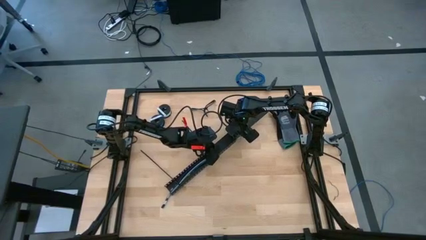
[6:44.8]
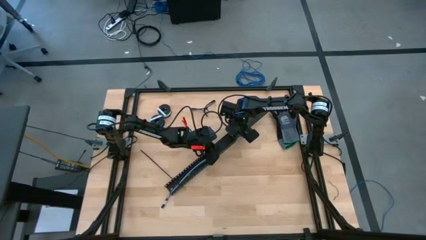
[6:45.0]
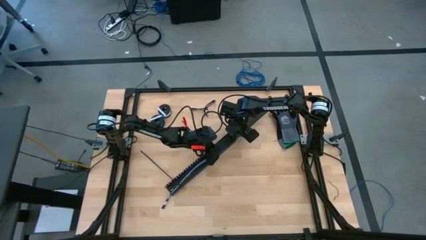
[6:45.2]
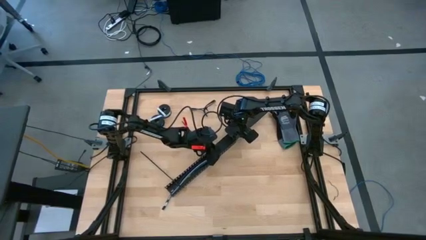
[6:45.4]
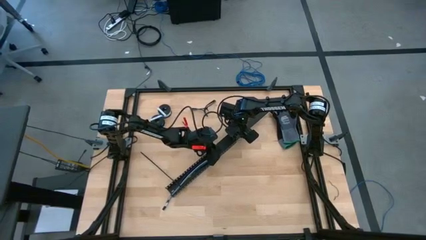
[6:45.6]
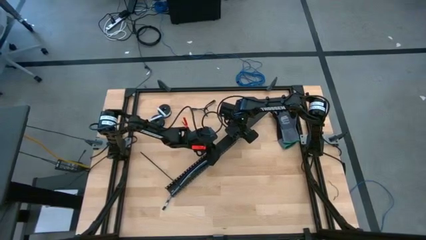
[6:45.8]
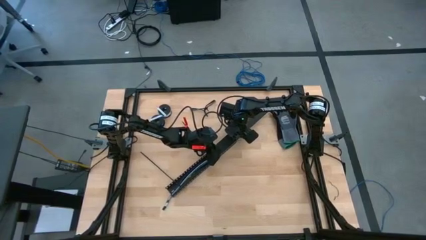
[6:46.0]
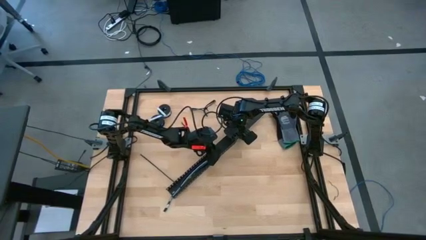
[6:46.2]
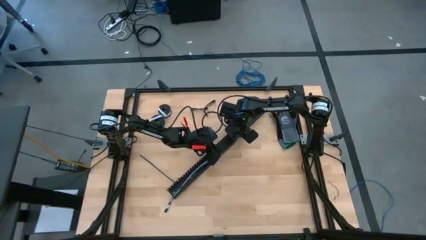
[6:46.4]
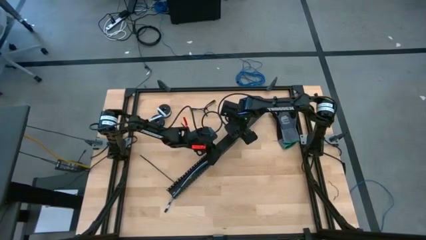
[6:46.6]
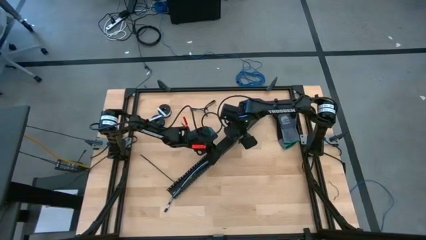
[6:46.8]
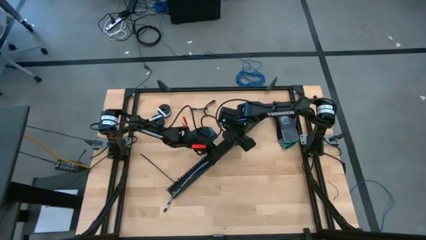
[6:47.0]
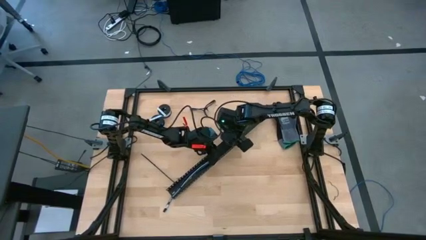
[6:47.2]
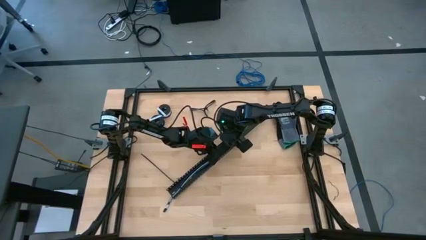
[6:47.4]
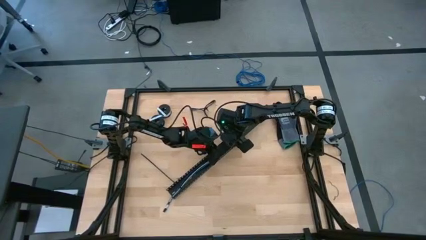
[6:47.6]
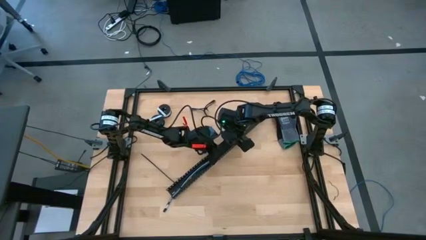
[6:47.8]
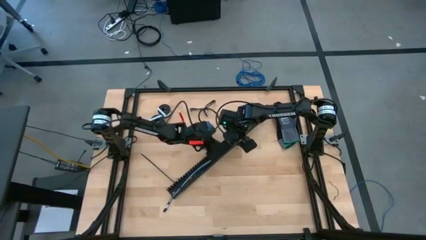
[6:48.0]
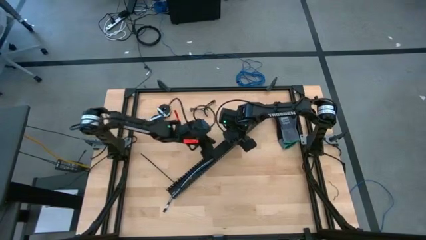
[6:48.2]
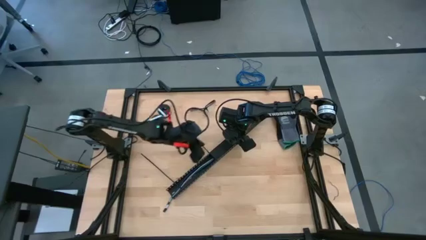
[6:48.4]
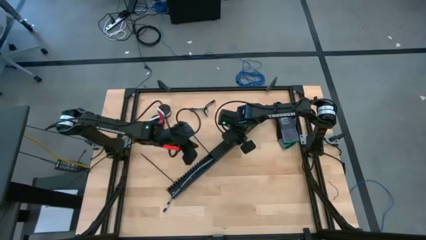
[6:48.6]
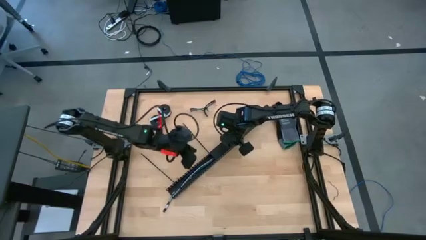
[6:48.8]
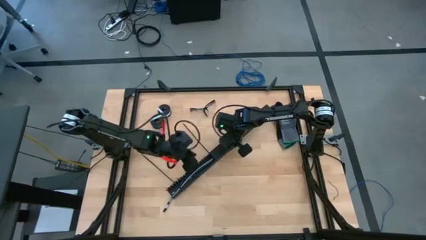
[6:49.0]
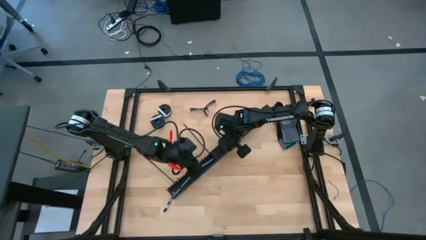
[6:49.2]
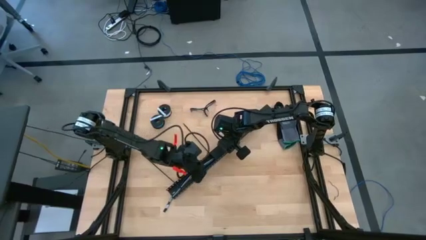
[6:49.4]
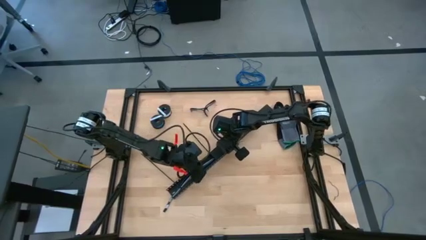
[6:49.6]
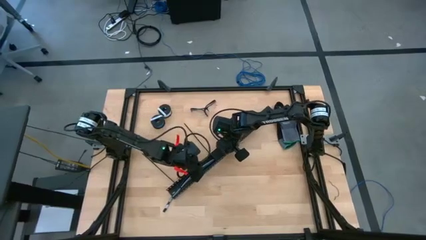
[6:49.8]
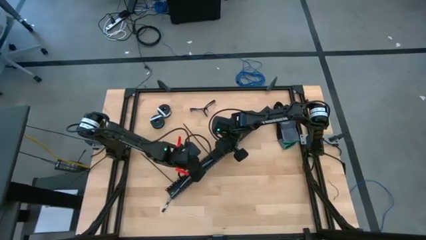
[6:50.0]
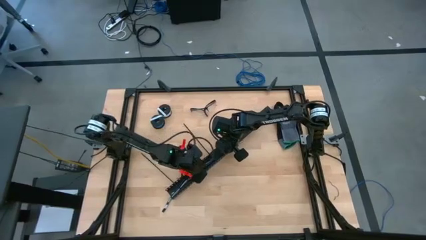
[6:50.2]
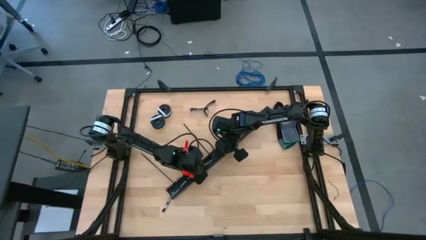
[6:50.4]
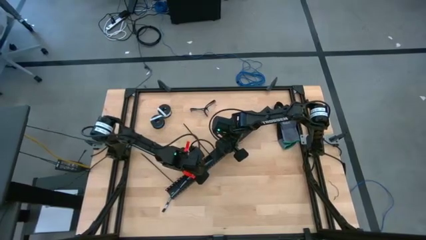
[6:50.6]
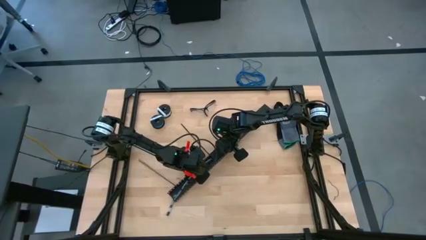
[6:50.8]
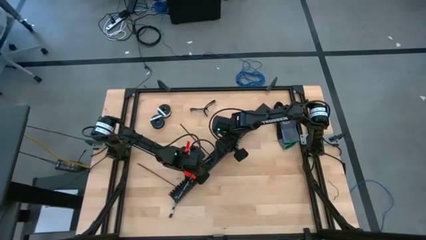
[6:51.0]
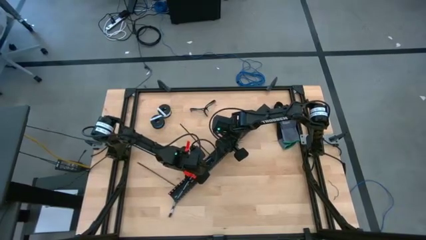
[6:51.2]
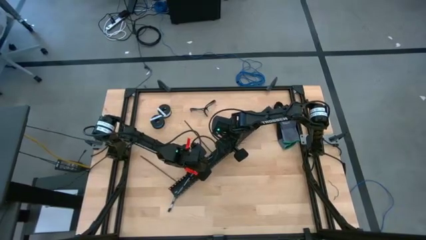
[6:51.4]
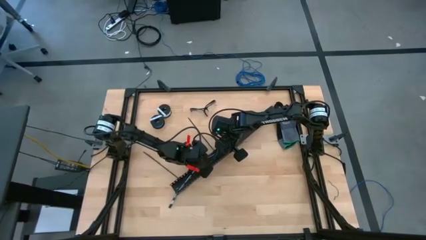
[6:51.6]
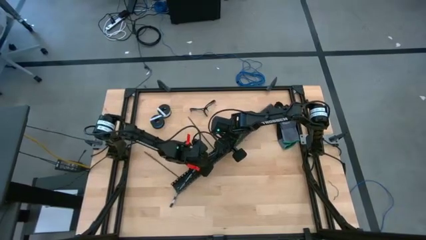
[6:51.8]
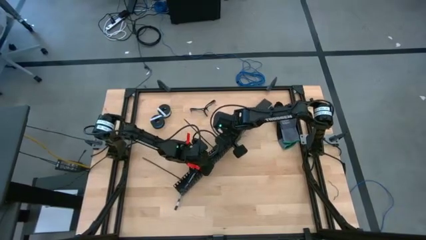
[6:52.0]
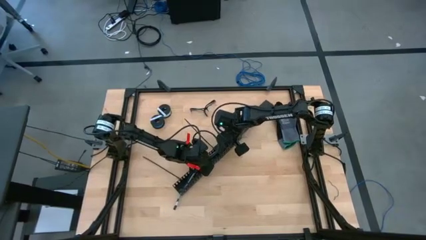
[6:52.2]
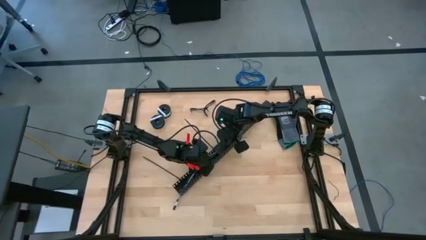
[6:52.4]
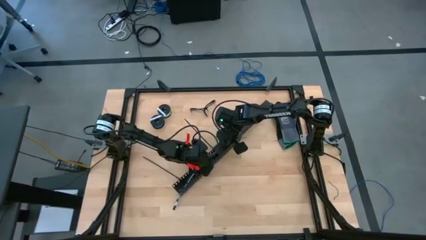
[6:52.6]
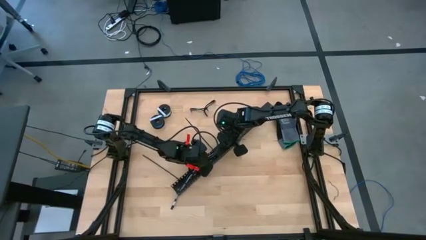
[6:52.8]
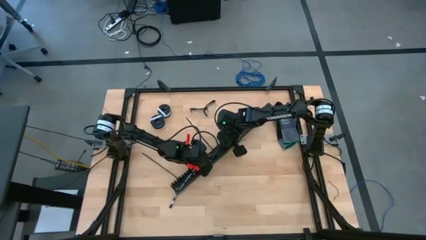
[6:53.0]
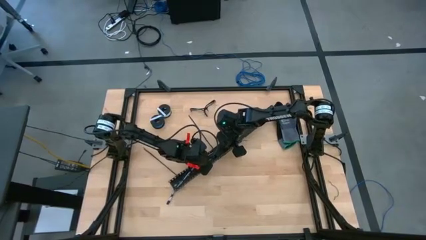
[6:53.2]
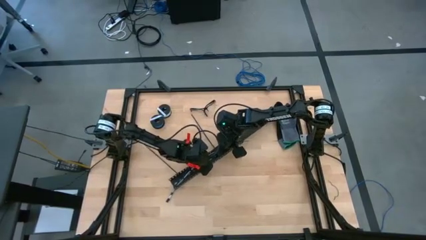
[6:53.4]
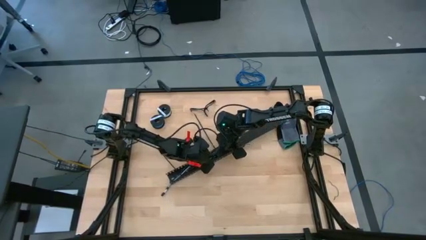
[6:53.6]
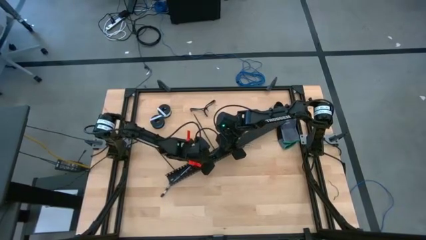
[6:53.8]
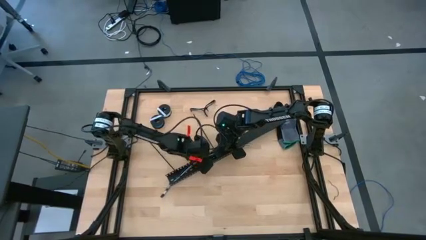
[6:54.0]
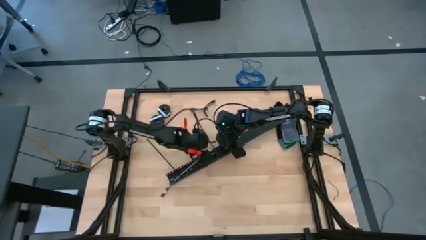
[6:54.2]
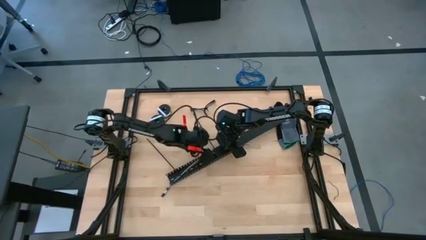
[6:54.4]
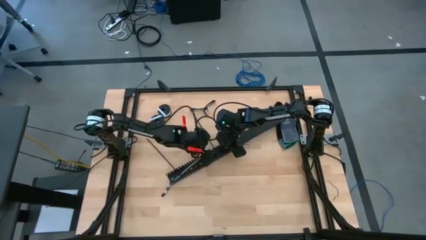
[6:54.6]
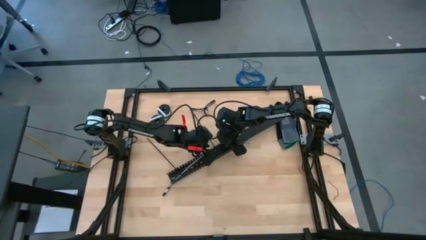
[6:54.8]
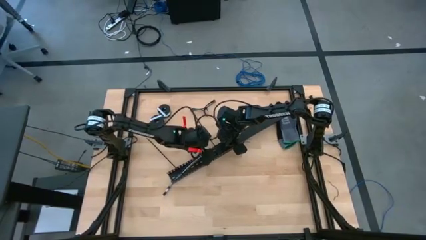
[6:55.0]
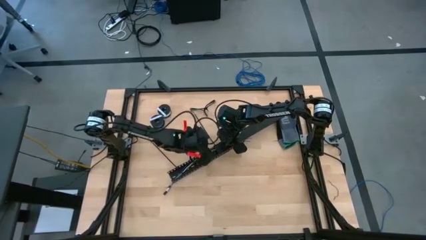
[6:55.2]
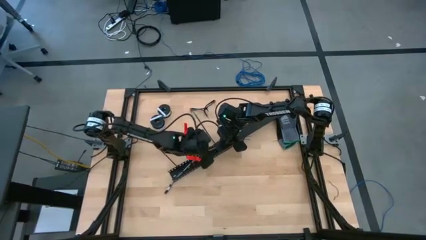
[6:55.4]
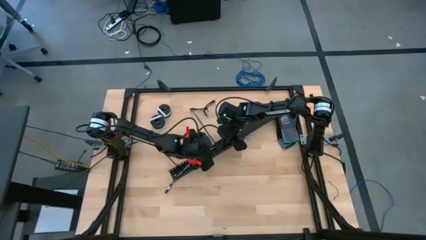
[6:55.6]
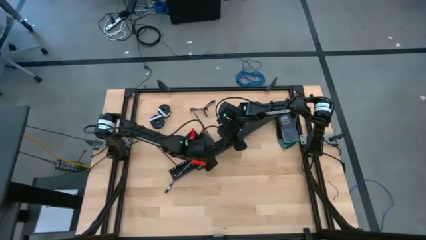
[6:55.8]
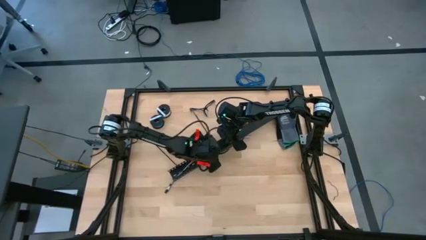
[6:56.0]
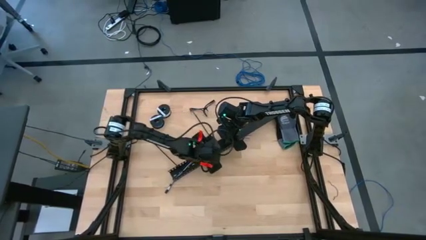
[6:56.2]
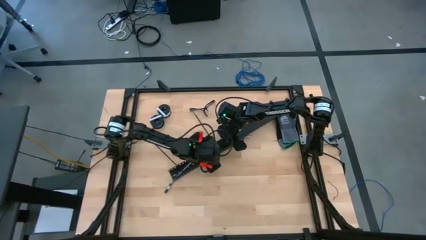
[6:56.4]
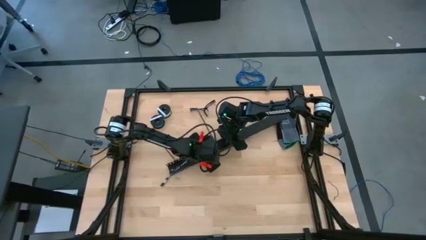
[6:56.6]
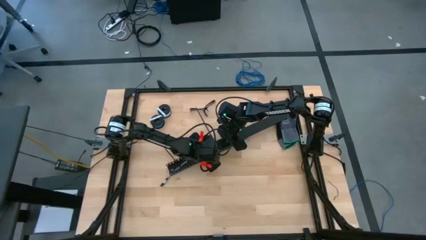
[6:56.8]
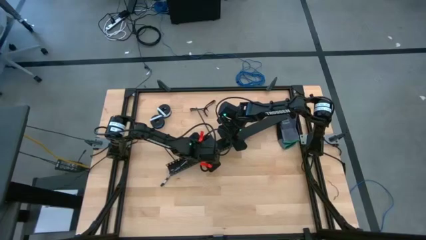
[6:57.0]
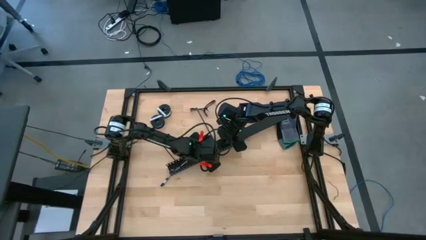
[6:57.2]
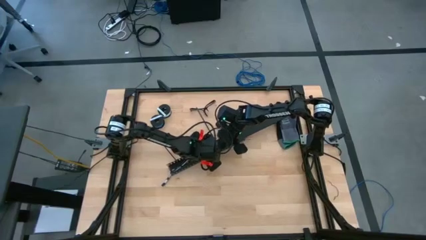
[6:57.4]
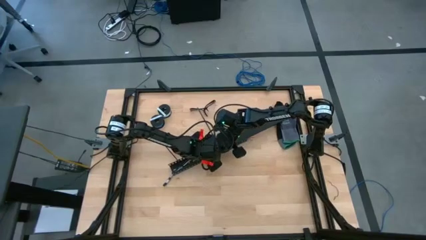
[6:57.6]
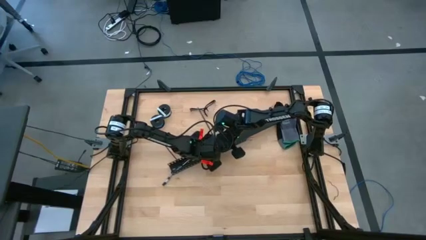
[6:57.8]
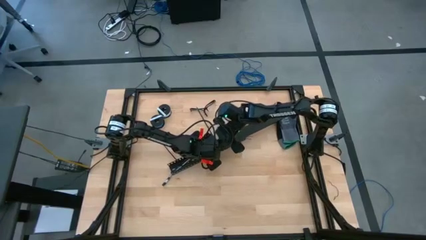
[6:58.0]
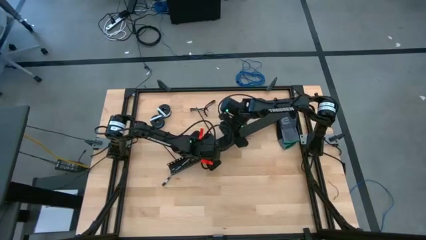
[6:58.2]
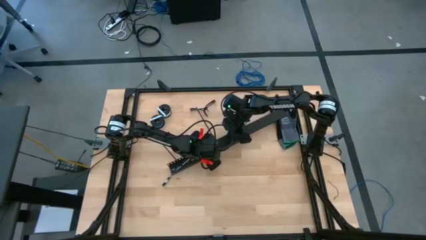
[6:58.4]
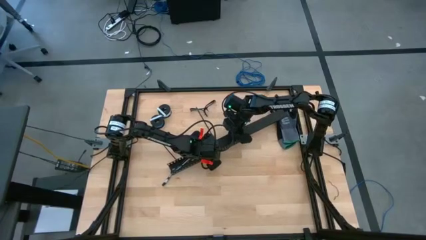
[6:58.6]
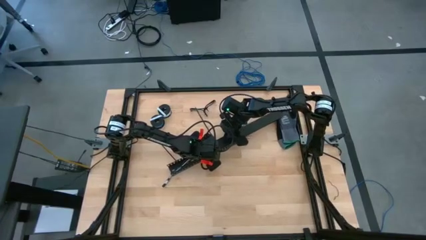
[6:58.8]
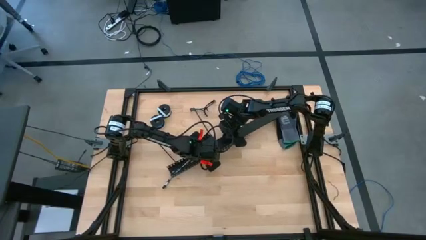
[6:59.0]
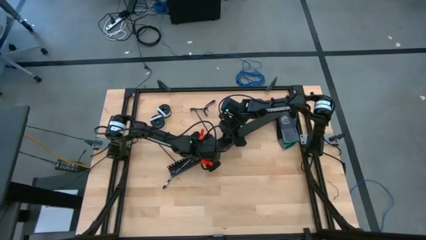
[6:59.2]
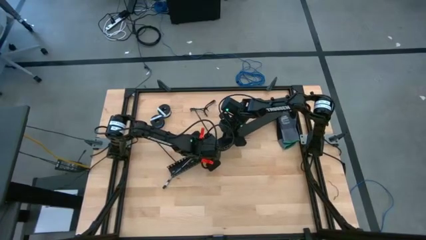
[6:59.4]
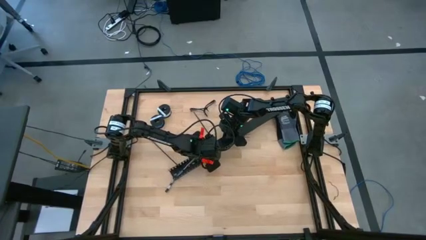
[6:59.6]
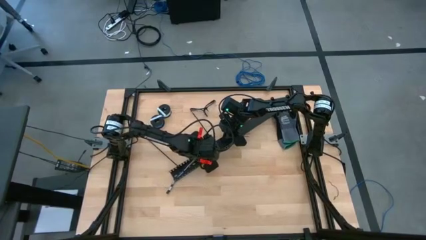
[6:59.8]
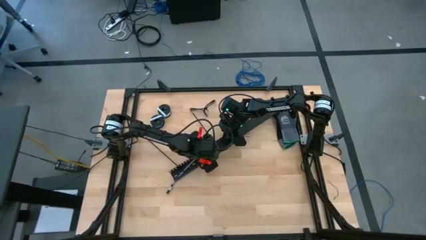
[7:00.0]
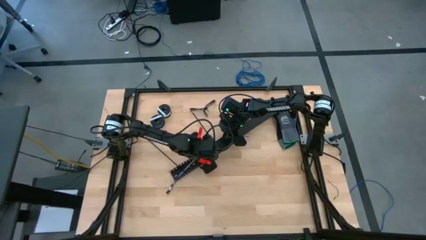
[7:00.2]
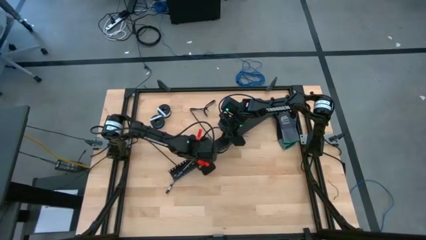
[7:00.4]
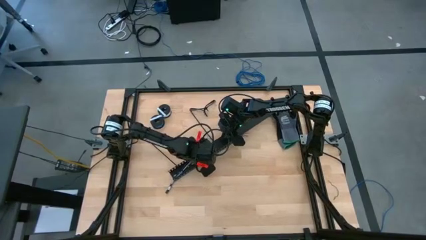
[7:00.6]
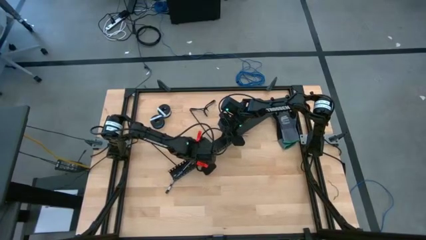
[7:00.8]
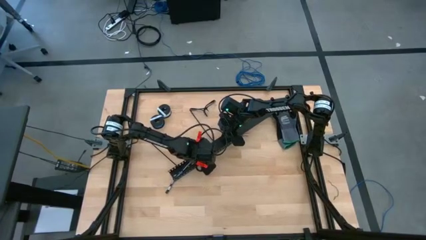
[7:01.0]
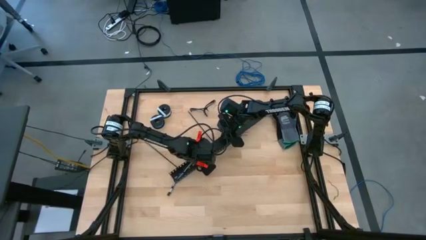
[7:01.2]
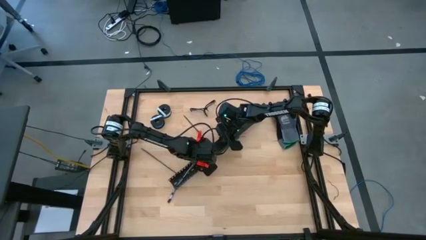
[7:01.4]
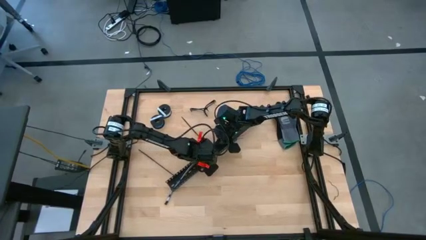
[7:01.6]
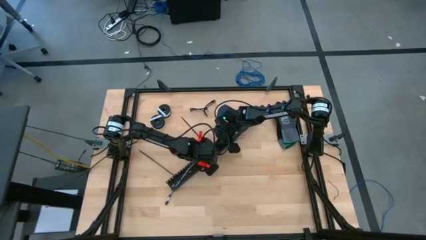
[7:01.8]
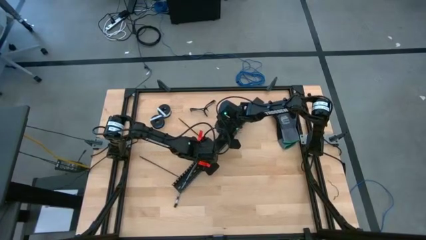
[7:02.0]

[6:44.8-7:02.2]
Task: Ziptie cables
Insert the black cover of the black cable duct
